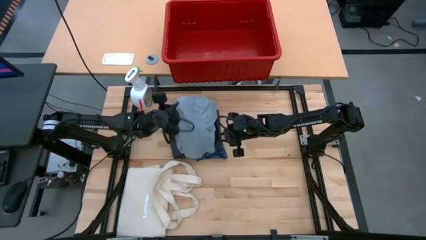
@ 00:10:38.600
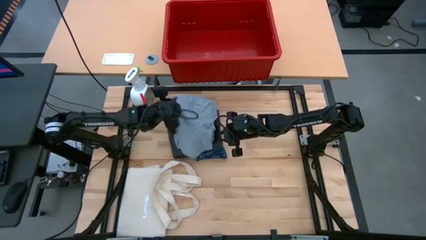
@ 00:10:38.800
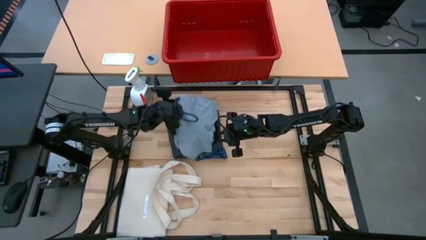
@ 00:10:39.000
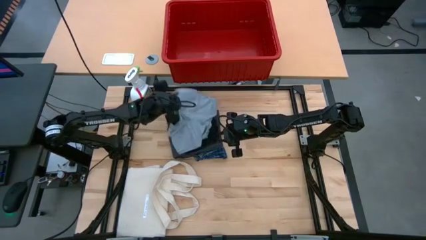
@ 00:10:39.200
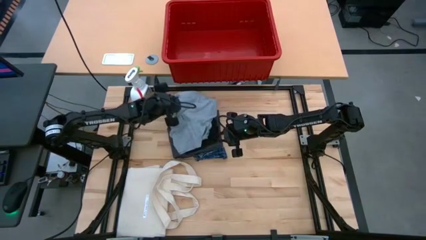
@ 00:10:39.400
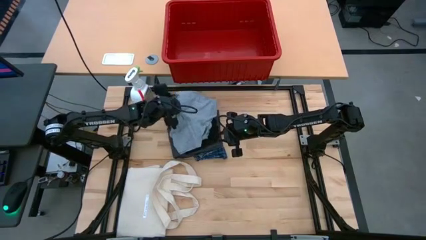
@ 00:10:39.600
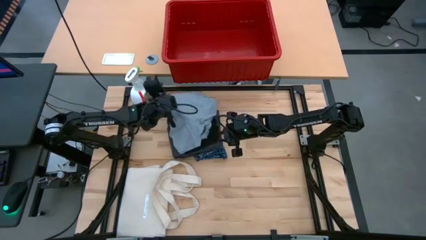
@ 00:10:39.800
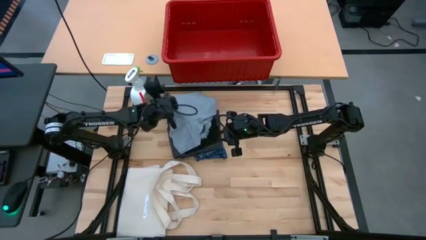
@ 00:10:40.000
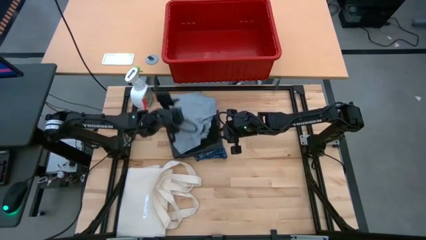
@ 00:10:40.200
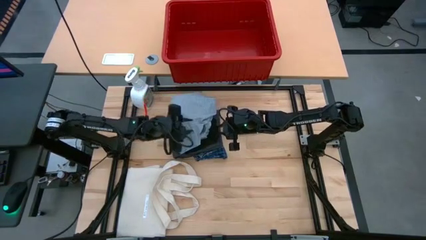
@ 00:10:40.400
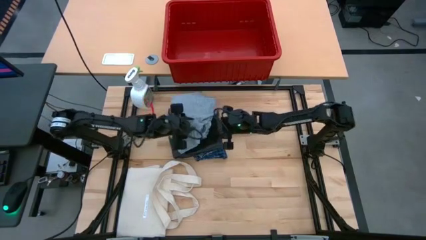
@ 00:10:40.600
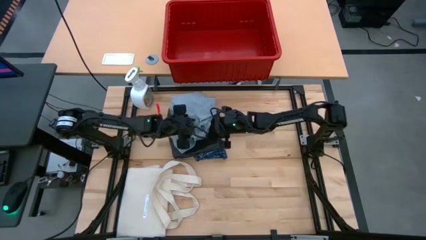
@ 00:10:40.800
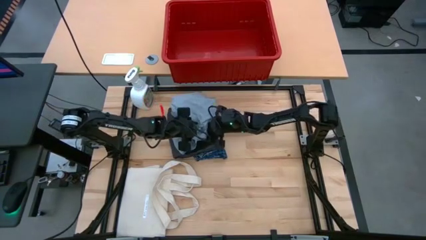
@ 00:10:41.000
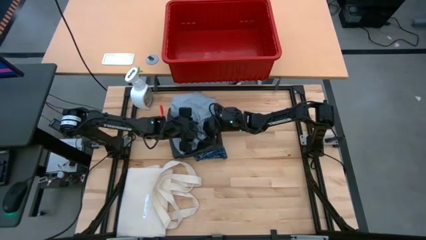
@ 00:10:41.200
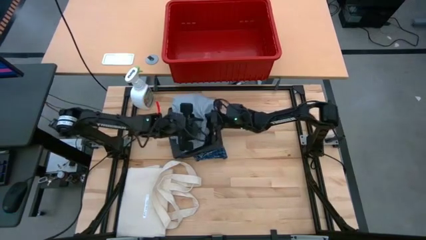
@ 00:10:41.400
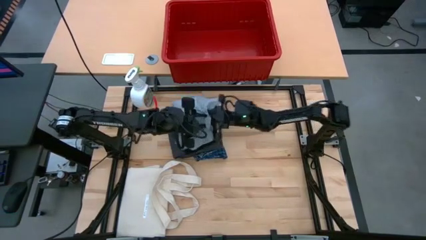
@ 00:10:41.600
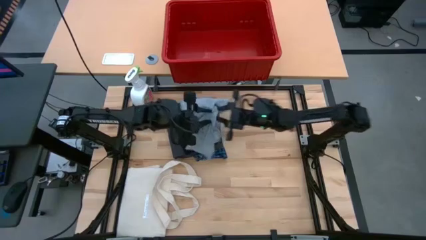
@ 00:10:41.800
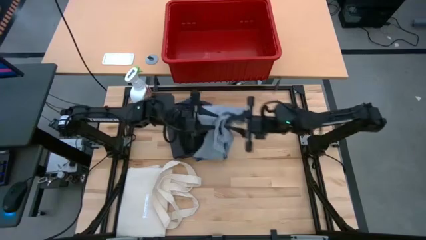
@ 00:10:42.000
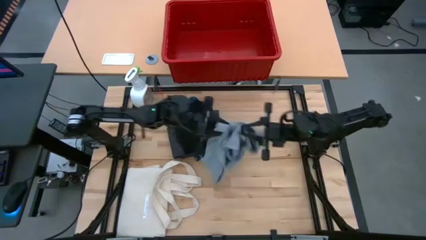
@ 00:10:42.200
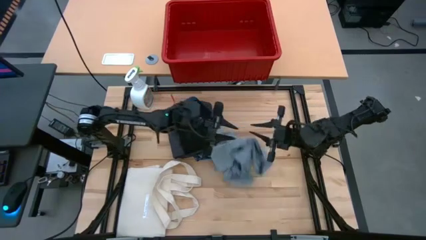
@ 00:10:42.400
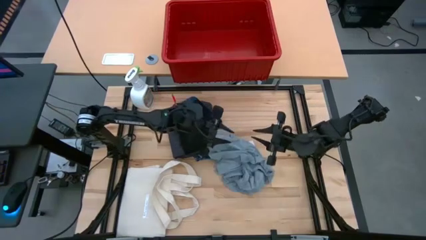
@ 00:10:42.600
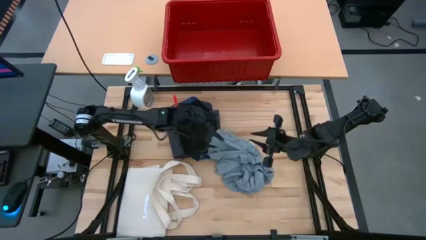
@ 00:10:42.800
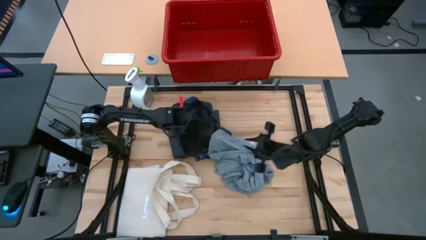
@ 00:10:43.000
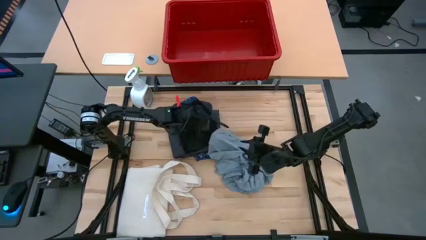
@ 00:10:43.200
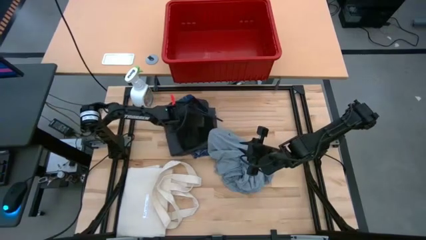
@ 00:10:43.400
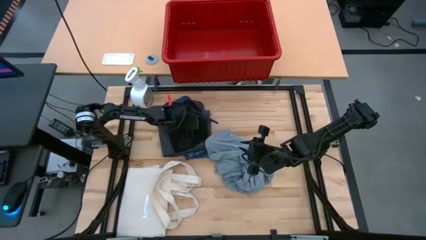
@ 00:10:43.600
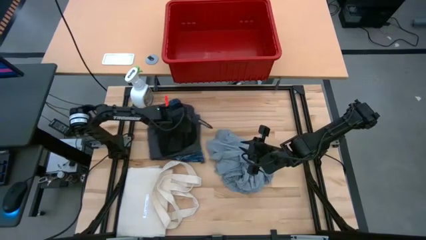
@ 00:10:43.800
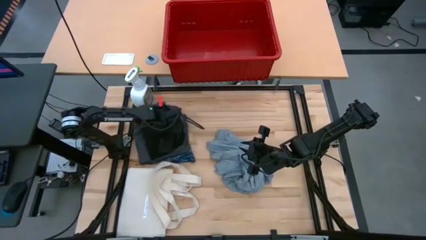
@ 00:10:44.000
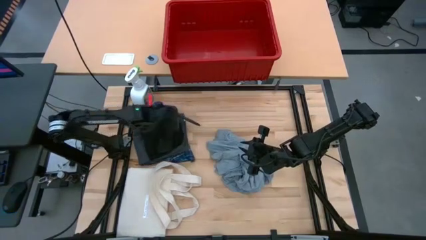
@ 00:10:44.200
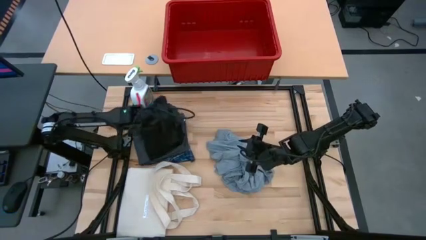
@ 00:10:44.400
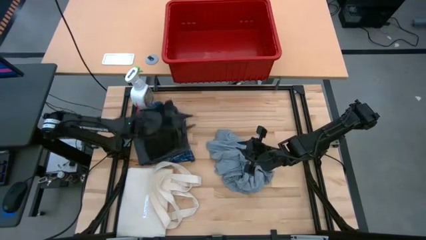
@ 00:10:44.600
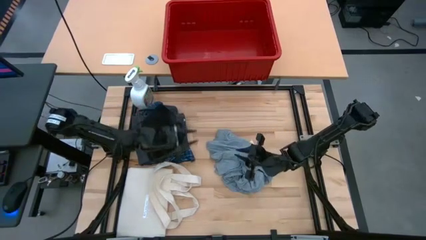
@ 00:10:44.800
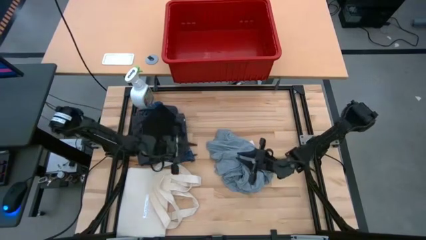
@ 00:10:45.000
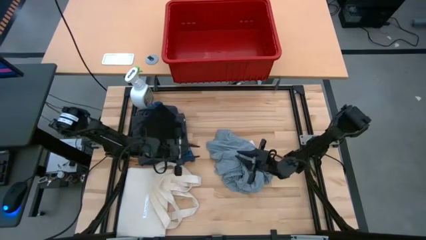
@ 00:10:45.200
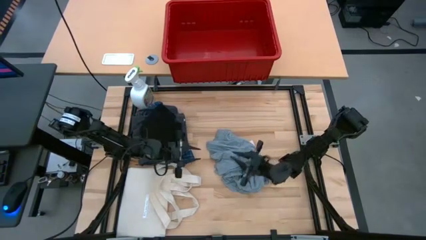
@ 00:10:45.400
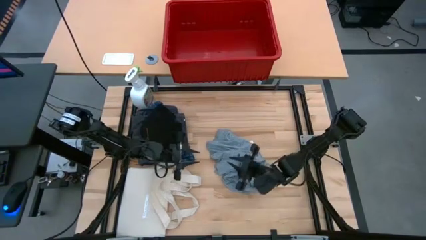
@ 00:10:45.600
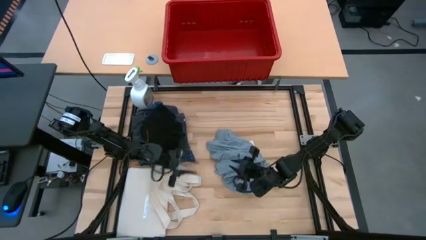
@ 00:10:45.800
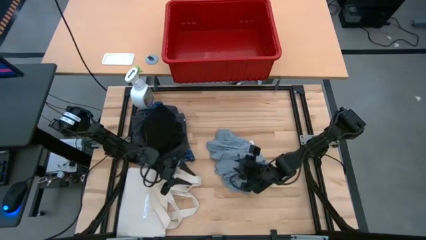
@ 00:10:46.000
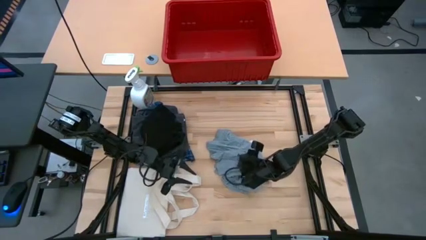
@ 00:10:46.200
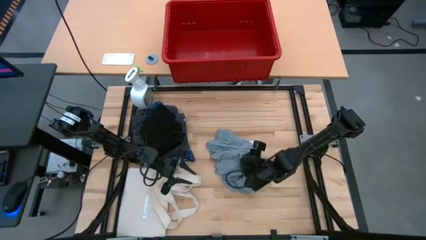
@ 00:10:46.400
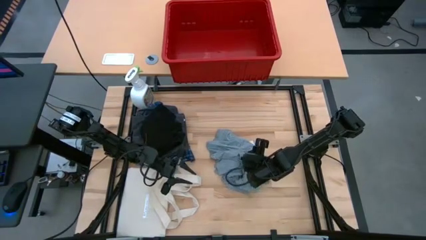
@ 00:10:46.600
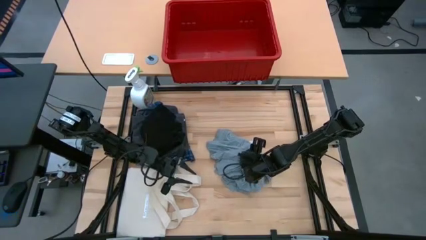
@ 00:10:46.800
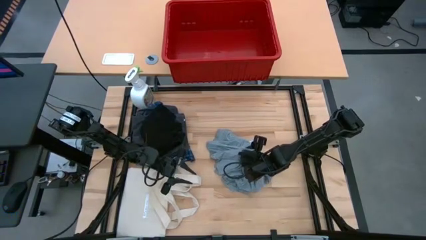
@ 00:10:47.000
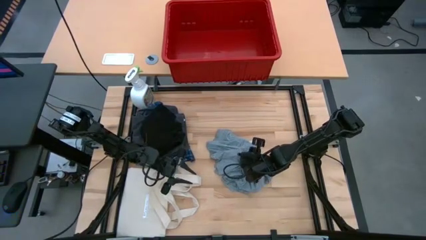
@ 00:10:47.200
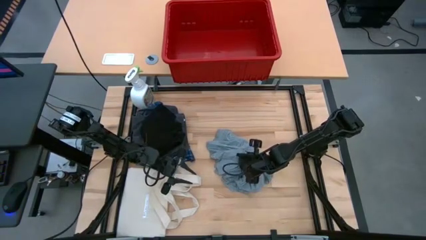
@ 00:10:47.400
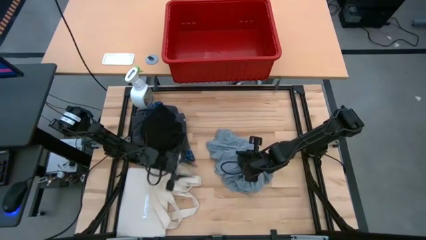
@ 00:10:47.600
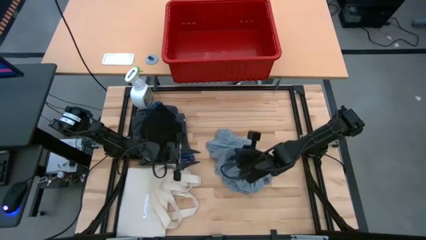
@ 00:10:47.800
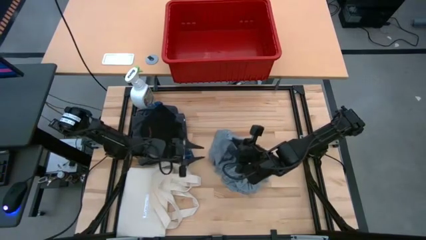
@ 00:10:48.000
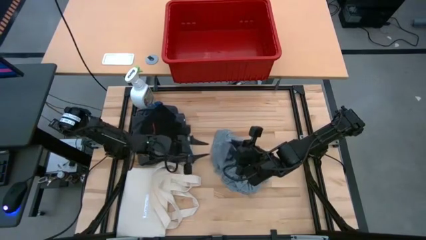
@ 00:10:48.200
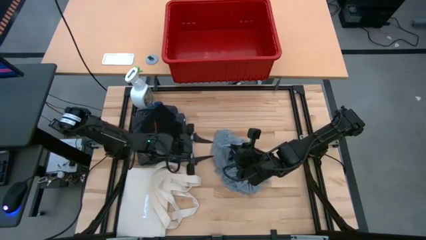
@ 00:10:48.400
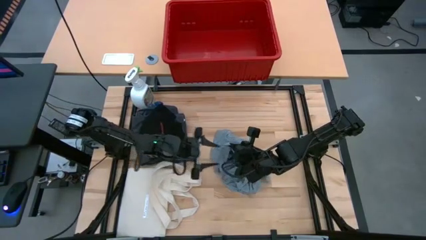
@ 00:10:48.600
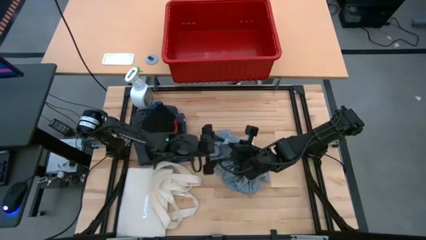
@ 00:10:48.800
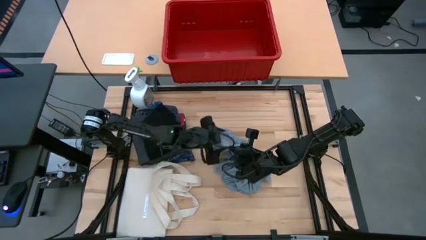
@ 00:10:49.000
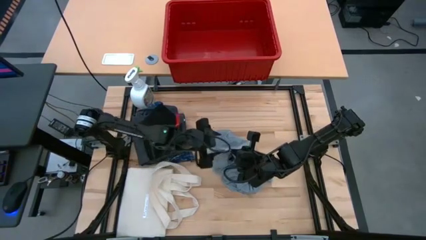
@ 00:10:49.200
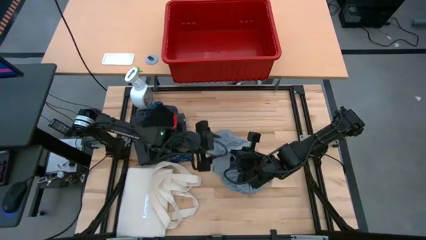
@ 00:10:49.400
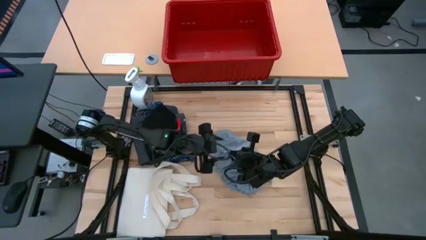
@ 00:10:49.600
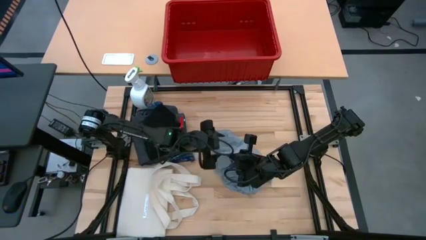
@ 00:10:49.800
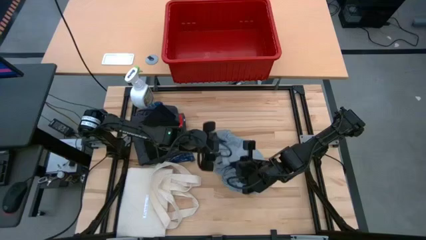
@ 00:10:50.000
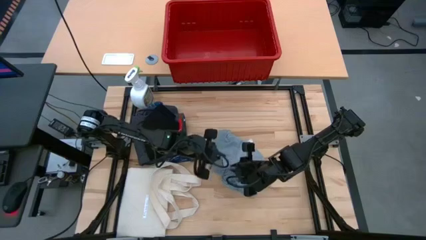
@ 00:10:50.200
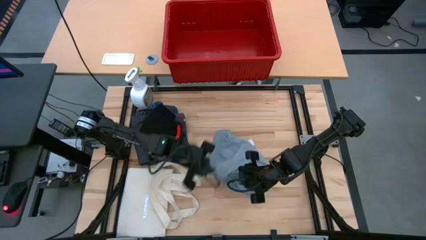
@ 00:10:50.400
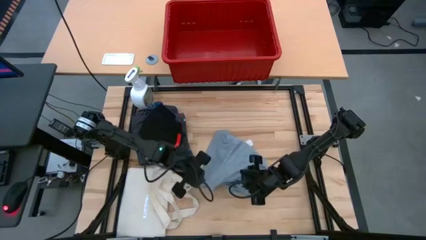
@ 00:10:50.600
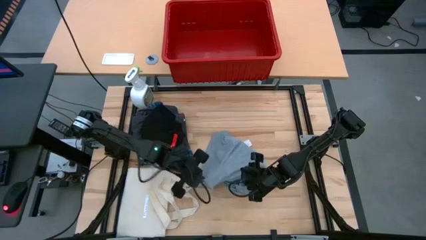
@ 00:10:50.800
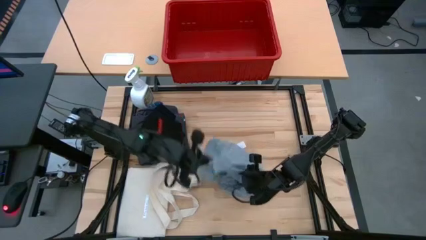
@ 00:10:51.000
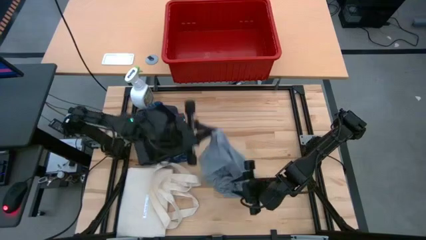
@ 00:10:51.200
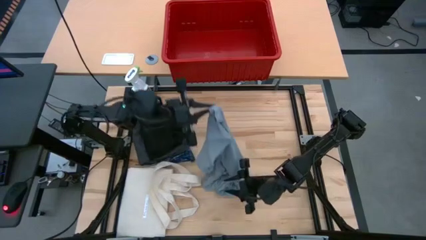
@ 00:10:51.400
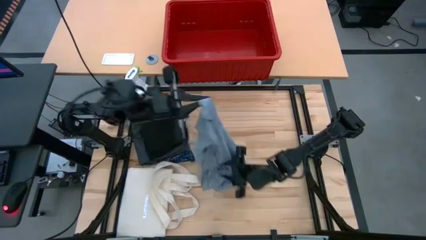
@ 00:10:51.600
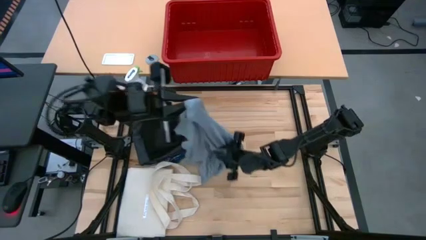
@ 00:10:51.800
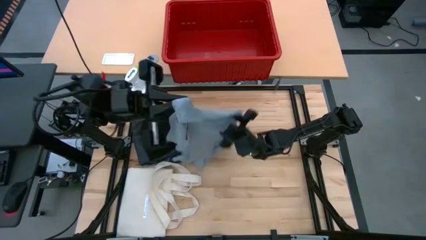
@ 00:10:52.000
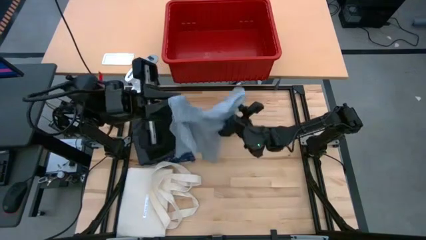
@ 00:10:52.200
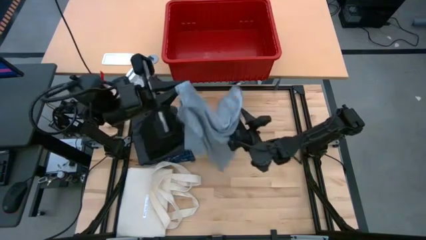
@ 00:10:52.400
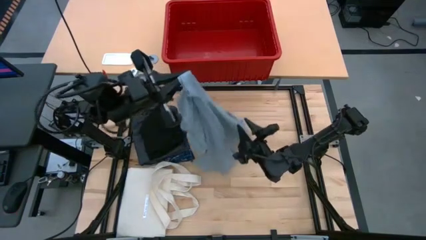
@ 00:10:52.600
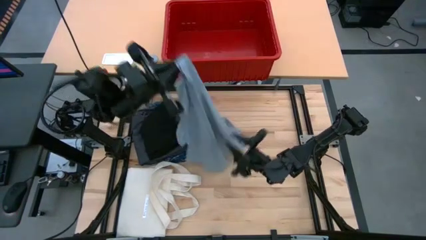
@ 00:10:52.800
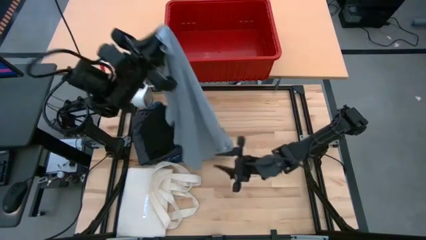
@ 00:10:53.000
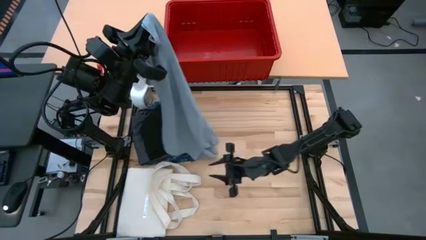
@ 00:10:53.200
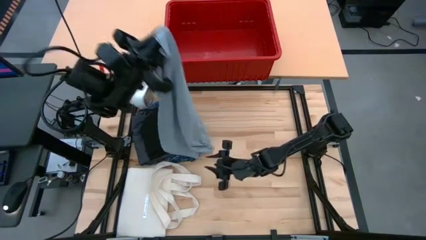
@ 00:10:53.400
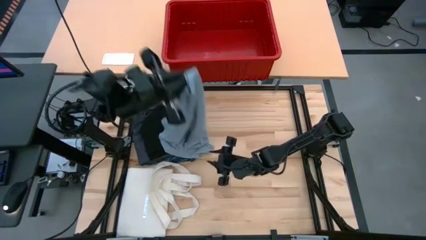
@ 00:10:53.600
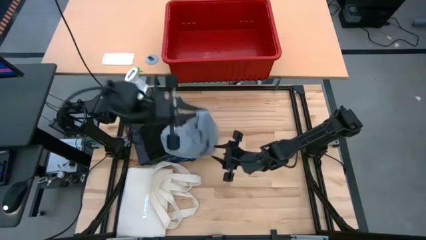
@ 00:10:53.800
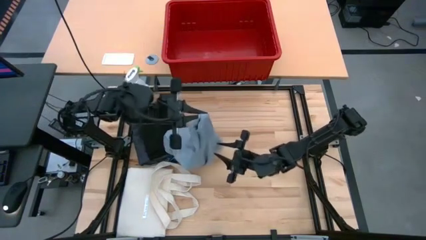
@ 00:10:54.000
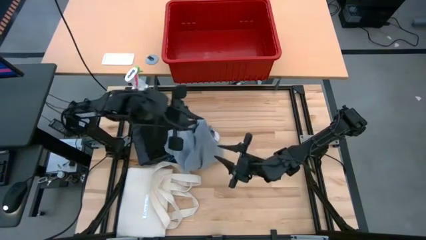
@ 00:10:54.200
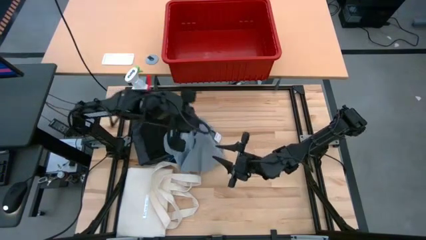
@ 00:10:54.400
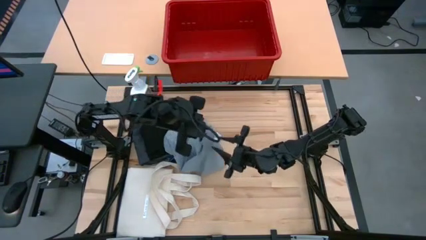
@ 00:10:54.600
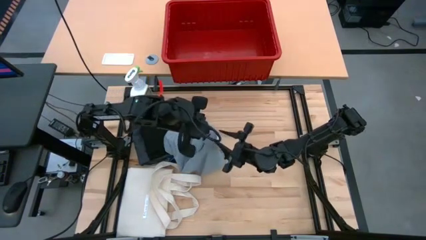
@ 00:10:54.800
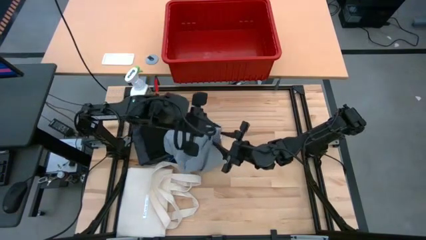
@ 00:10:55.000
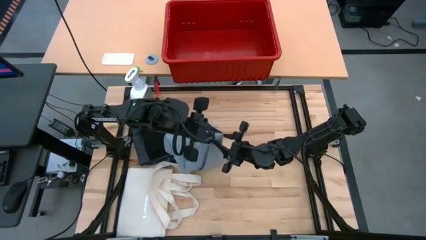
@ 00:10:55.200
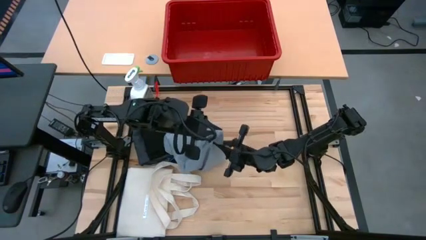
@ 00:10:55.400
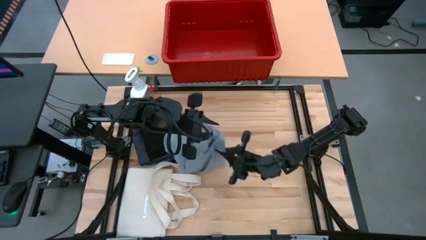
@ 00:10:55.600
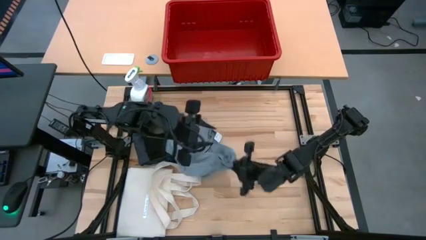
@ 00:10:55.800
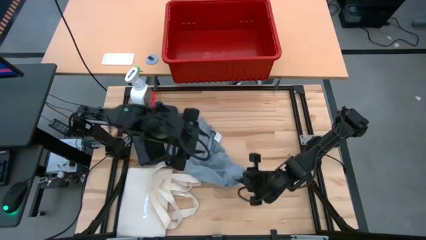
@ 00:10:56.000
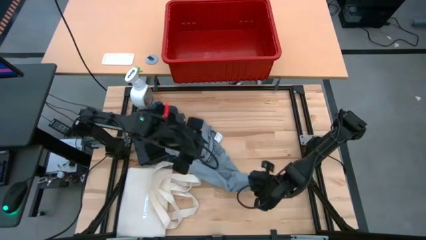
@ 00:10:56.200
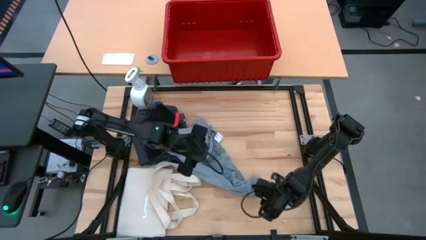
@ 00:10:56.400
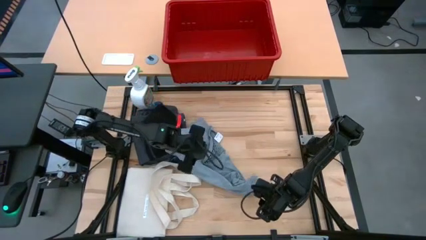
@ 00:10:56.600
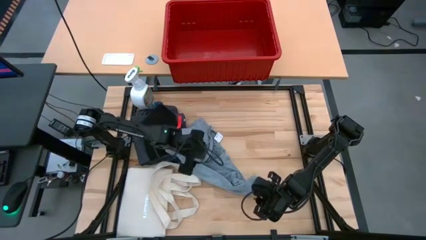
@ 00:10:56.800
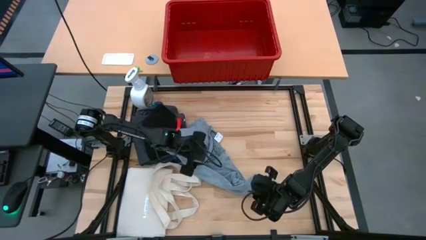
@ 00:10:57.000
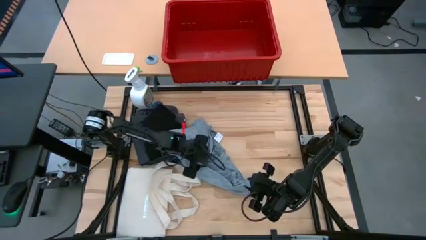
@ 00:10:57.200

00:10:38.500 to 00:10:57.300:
Task: Fold Laundry from Bin
Fold the gray shirt
